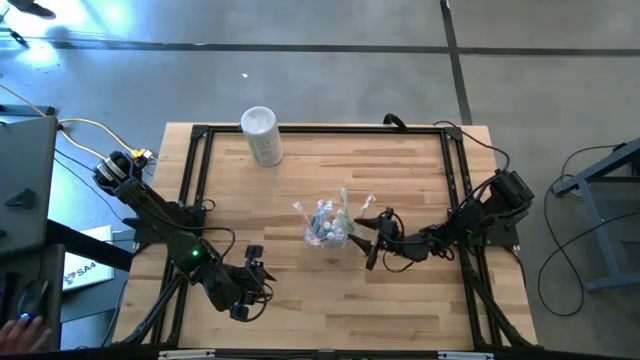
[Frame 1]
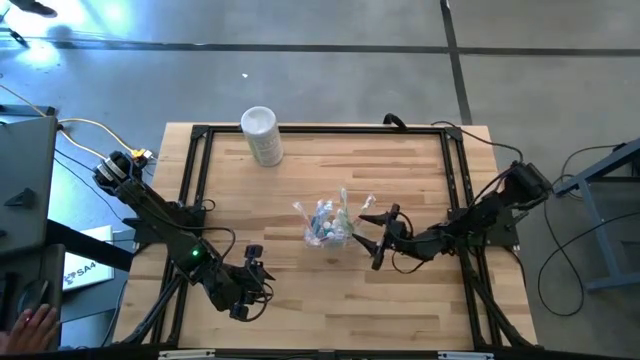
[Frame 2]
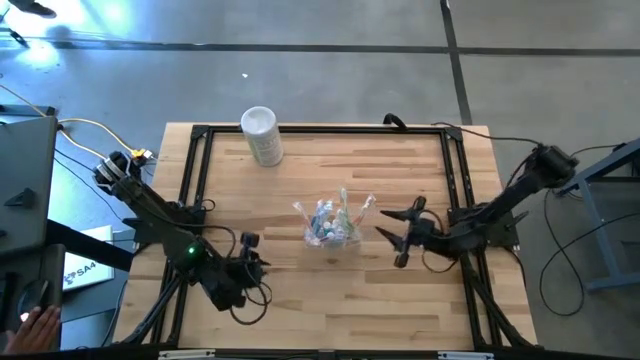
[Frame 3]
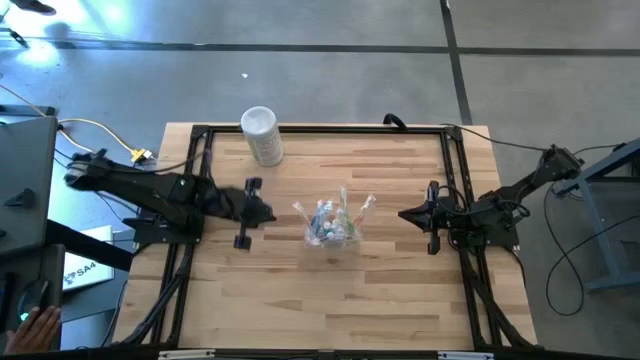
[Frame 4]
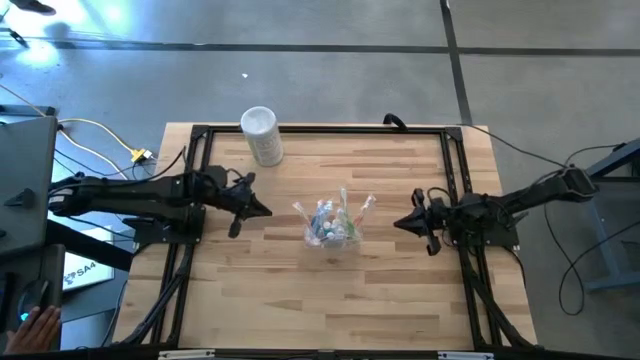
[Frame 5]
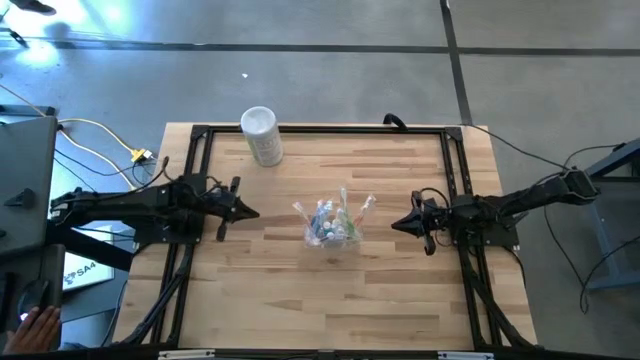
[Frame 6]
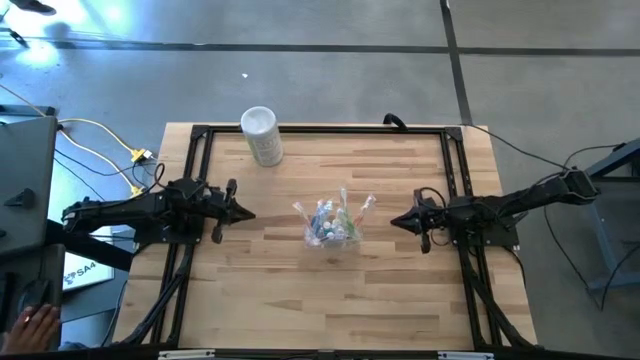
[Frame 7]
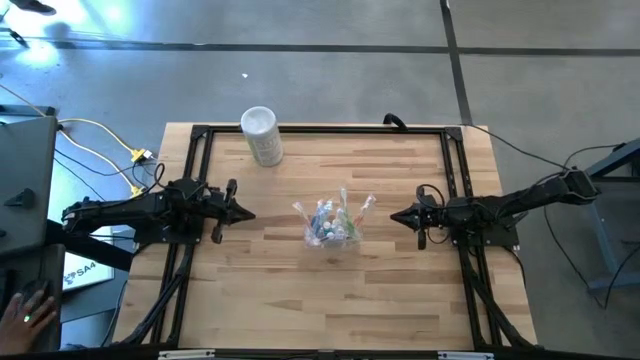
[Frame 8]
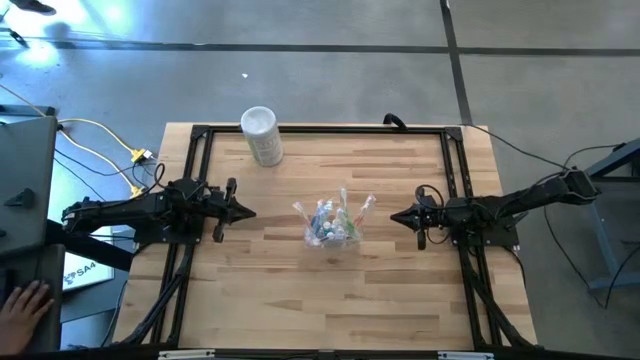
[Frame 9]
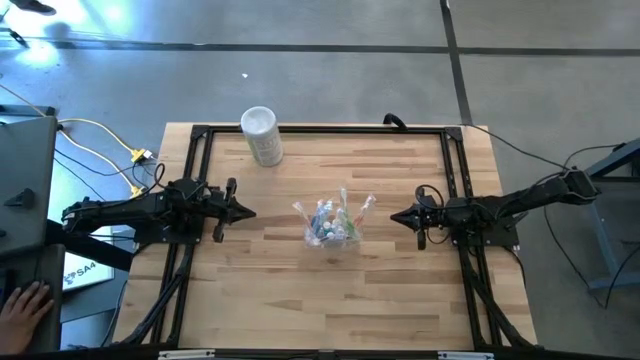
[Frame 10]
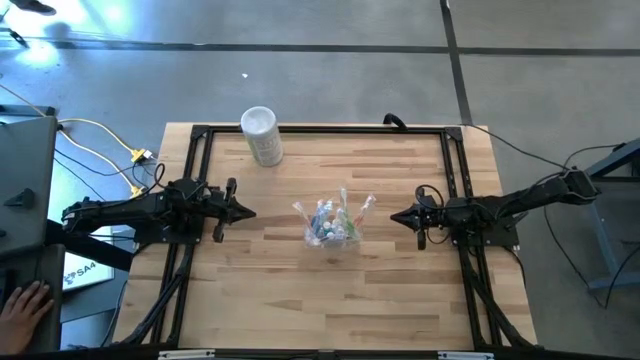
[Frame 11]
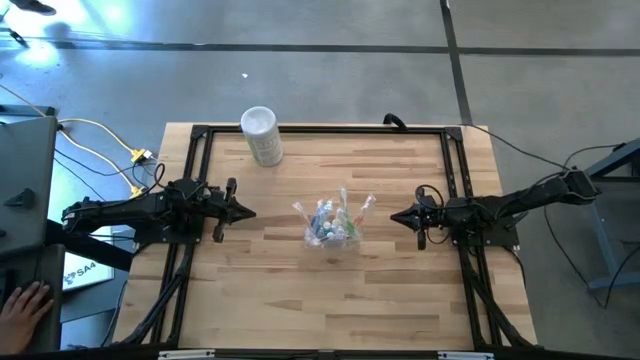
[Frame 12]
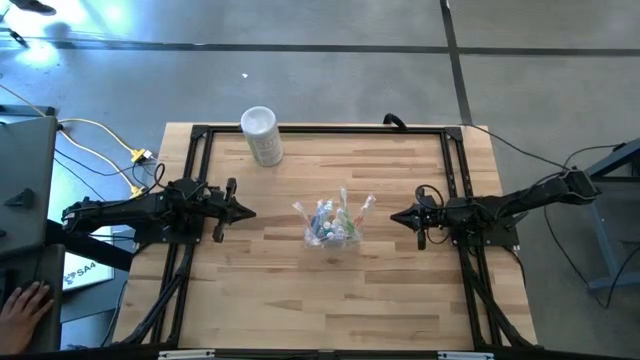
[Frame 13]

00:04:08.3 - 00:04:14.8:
Task: Pick & Place toothbrushing station
Return to Home Position

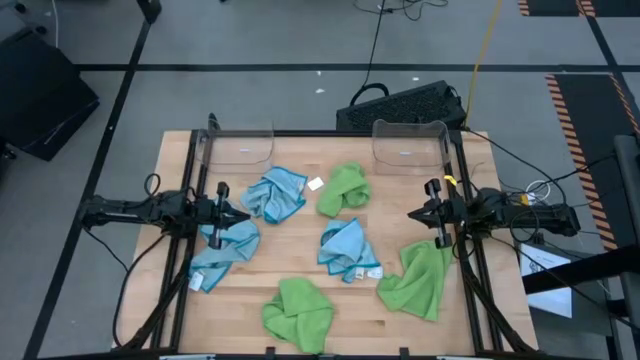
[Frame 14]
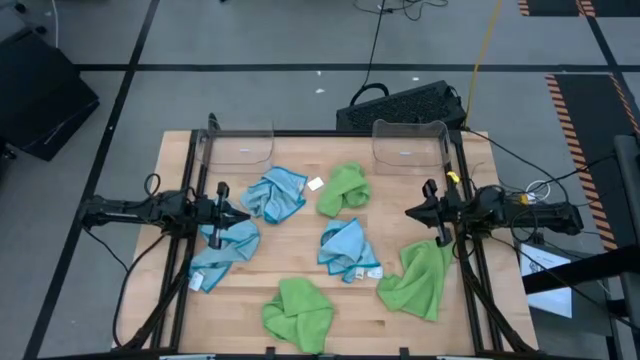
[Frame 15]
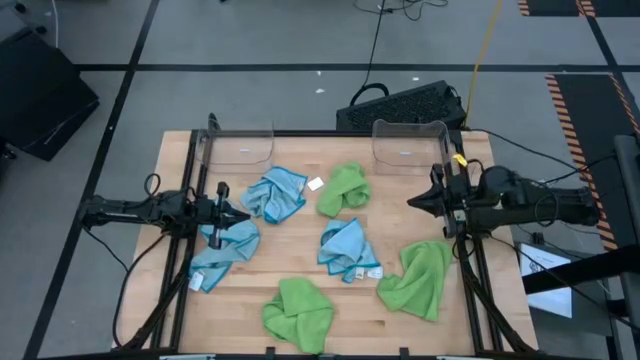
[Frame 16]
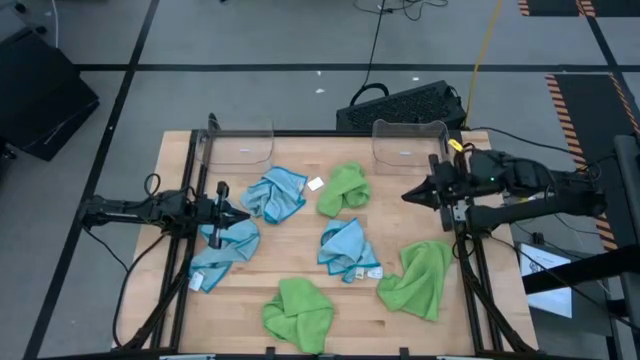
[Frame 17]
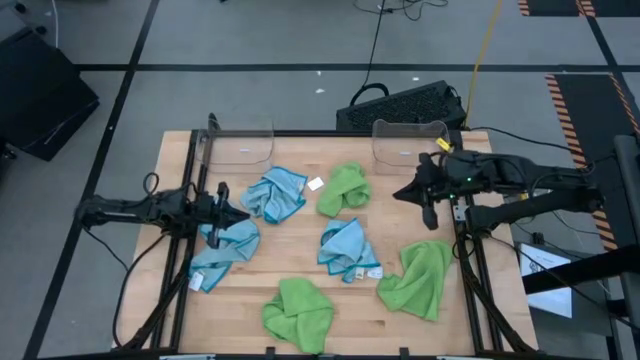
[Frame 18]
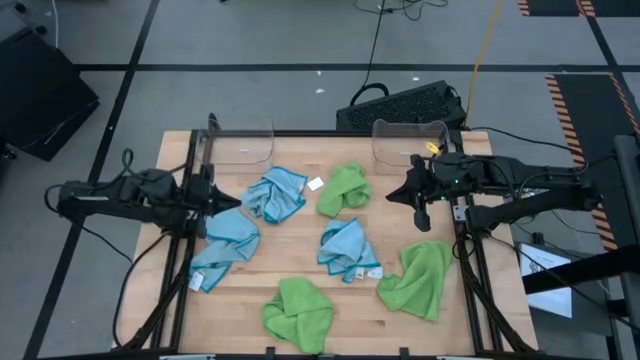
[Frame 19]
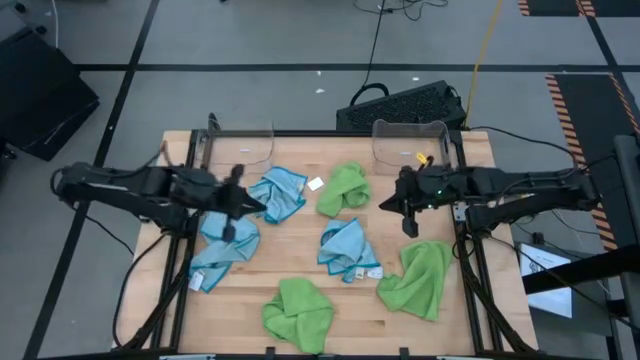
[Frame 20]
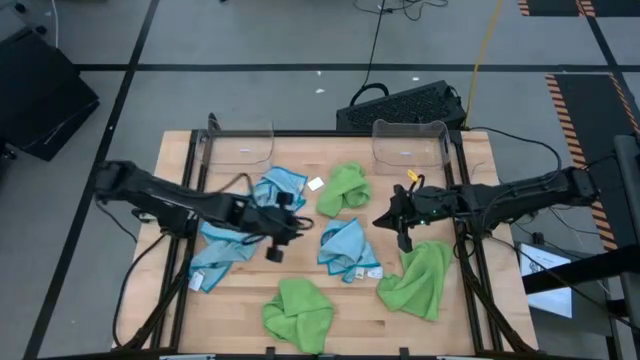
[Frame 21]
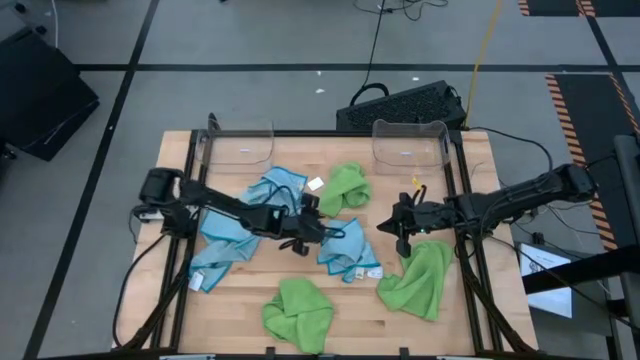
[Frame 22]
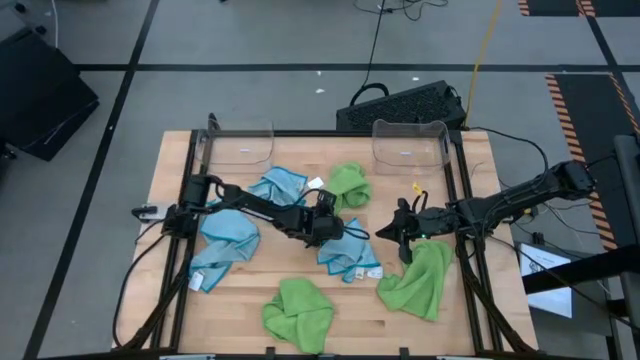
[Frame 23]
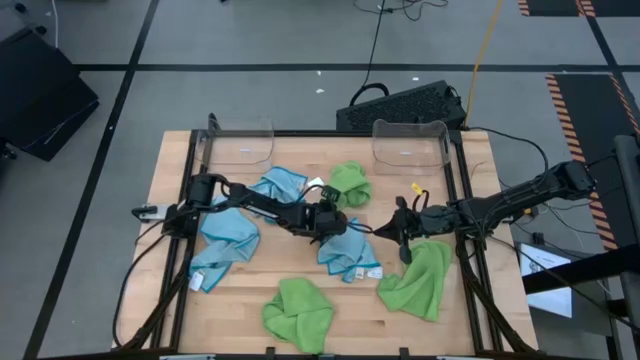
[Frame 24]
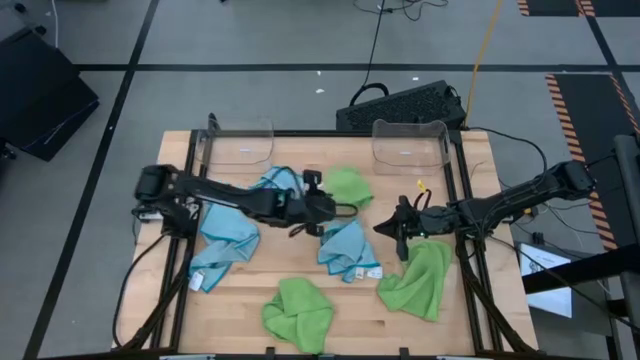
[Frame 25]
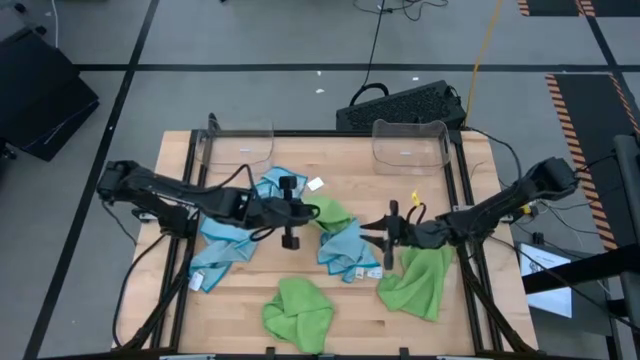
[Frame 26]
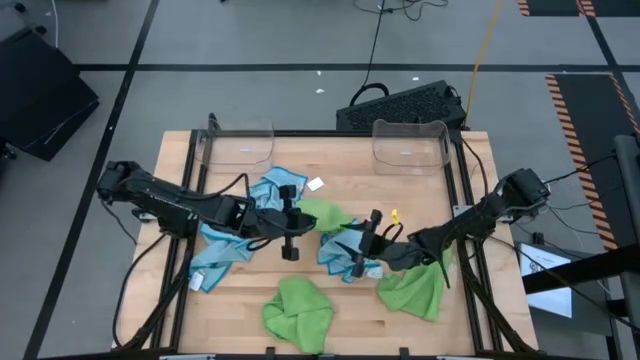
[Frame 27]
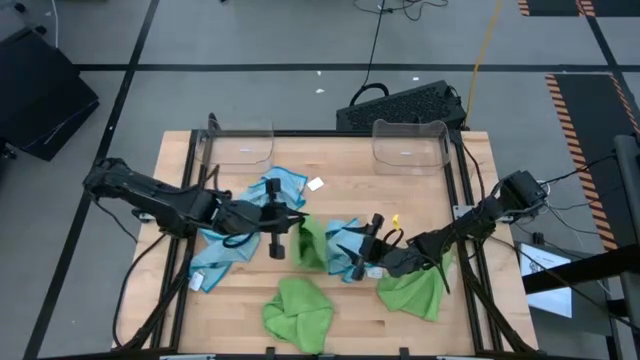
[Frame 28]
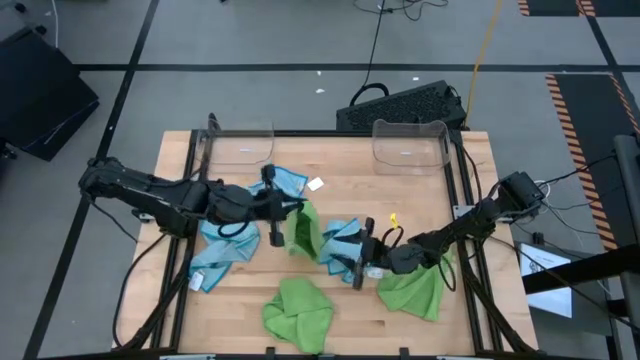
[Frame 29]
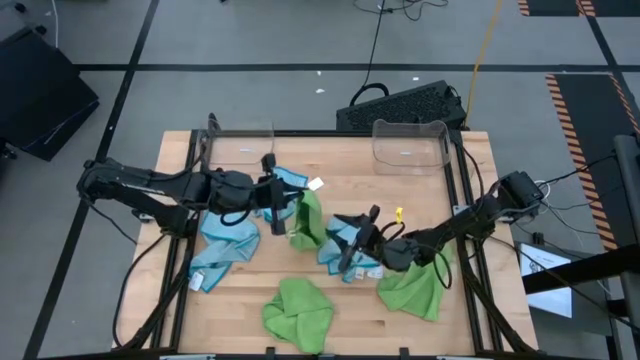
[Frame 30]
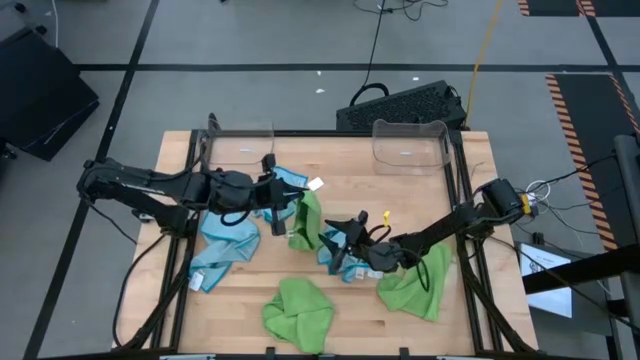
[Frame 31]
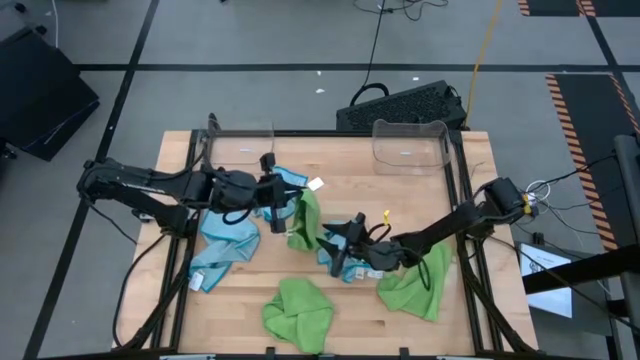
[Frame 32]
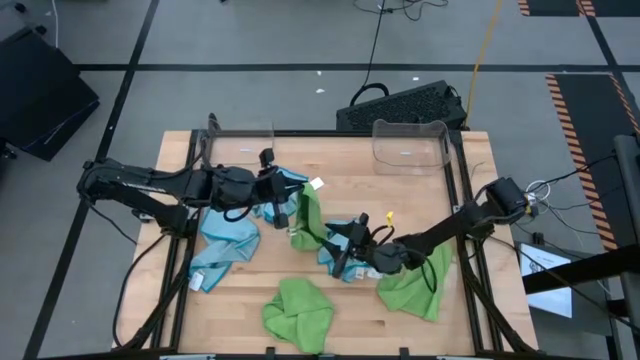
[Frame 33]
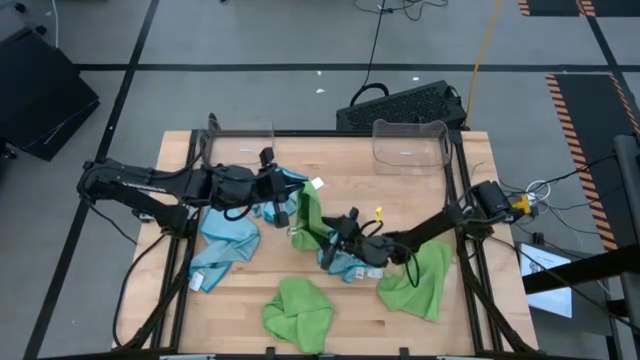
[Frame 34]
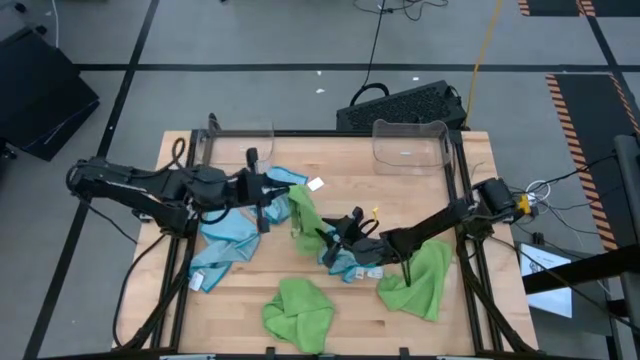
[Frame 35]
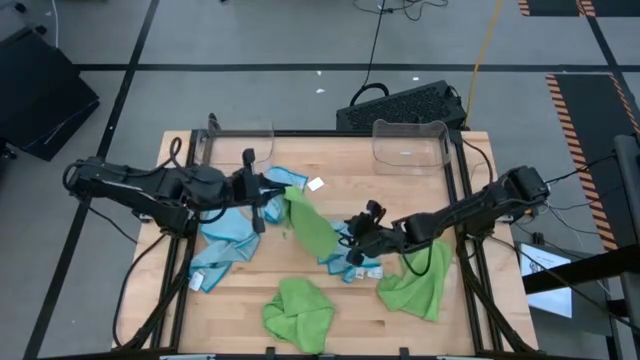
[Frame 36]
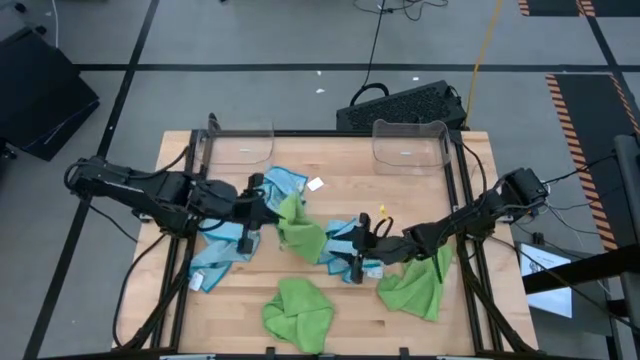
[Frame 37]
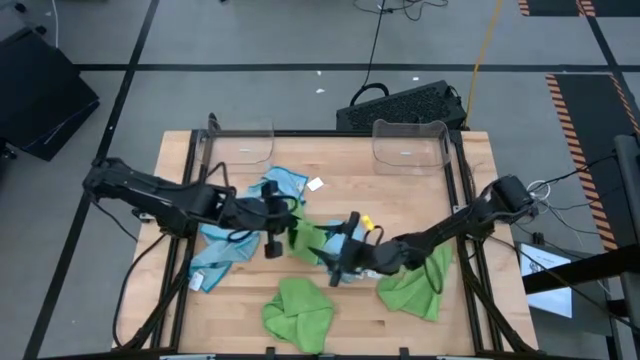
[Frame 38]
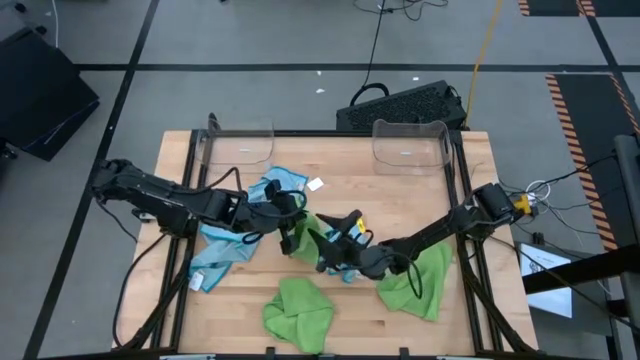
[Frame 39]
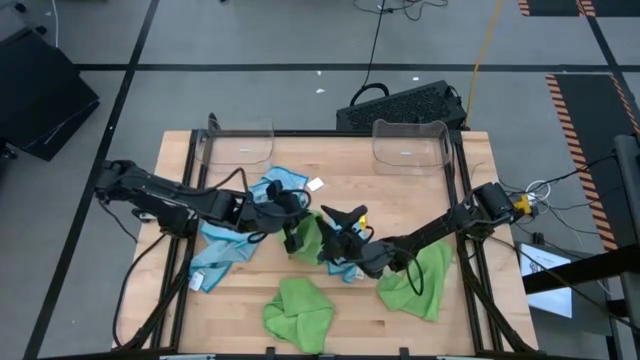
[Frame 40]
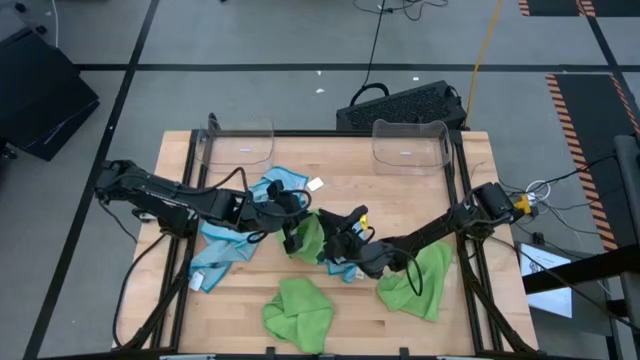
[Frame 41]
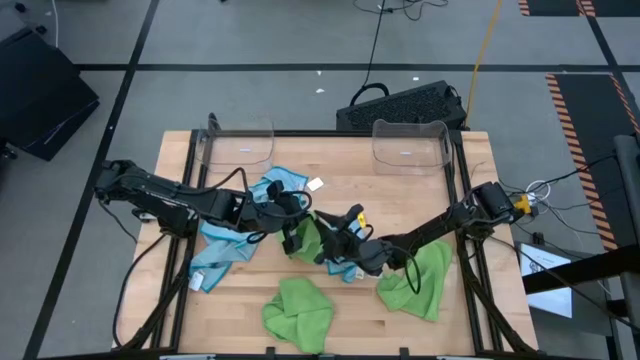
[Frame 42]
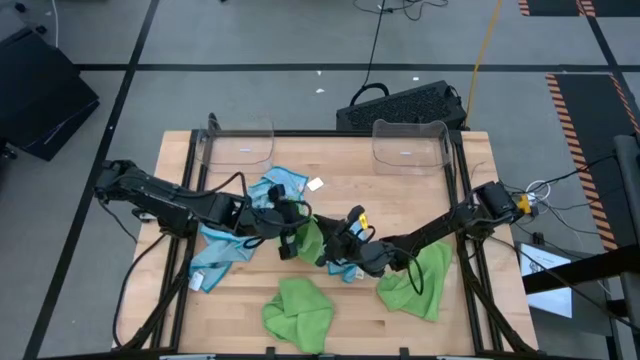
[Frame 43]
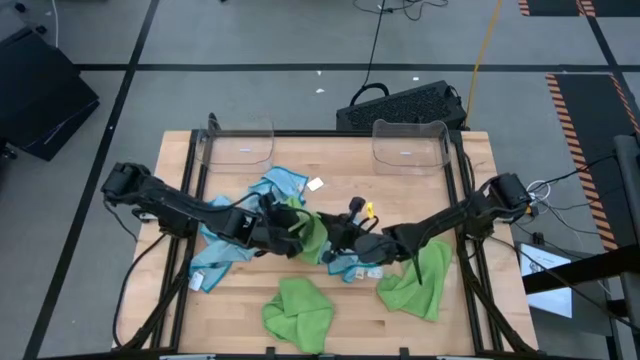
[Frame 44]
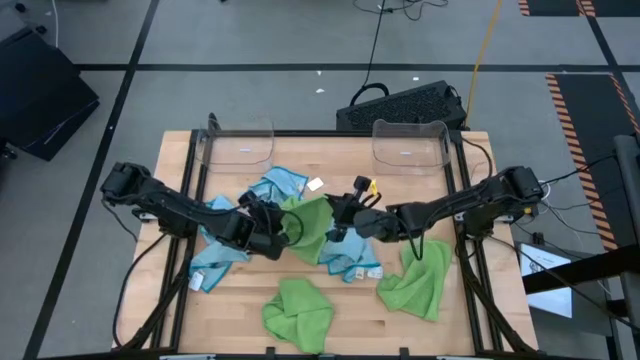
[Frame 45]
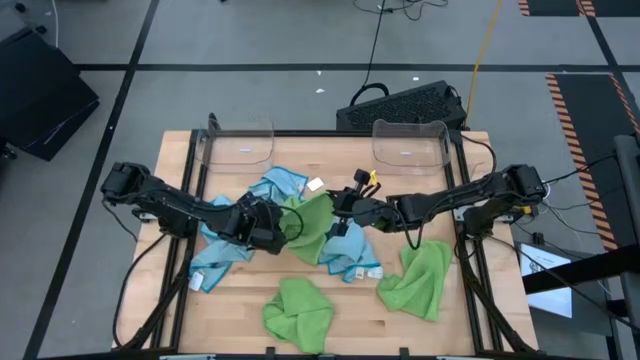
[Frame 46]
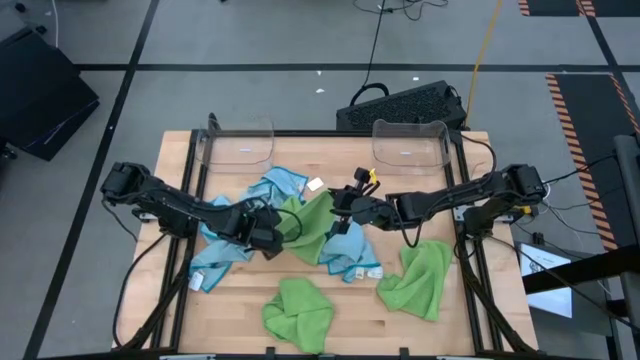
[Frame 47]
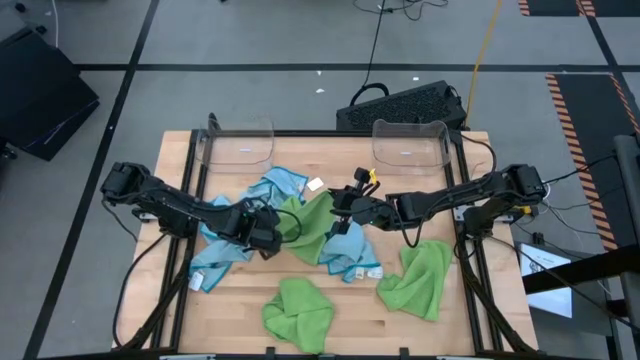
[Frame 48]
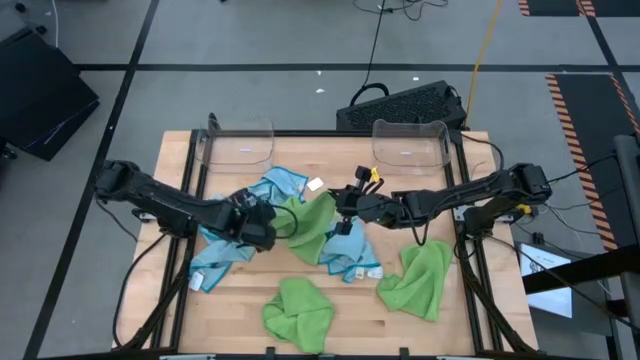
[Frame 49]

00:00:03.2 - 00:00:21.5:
Task: Sort microfiber towel by color & place in baskets
Fold the top green towel
